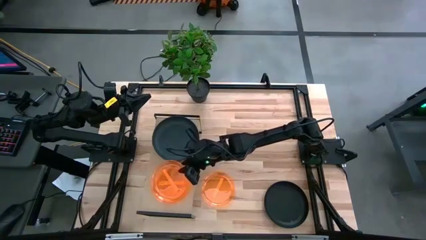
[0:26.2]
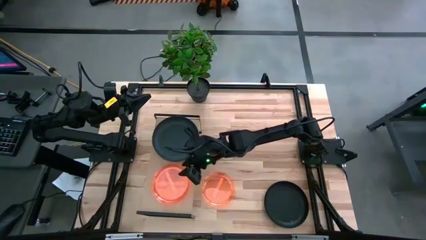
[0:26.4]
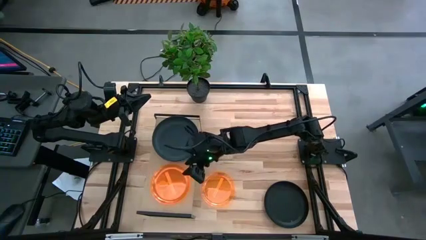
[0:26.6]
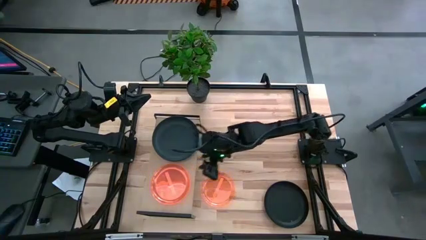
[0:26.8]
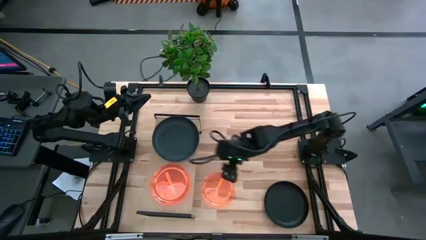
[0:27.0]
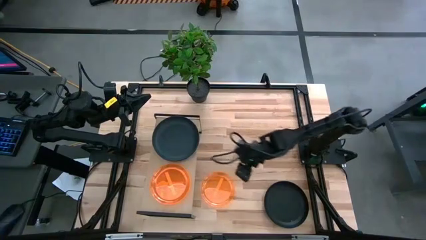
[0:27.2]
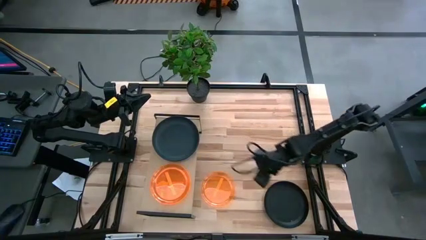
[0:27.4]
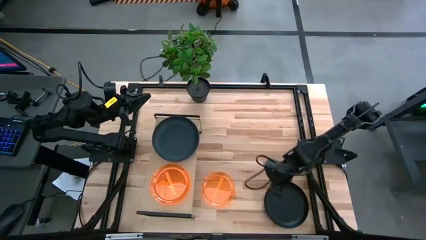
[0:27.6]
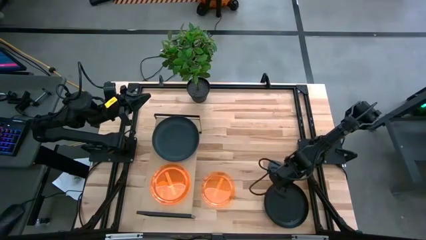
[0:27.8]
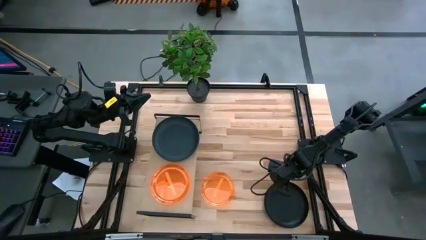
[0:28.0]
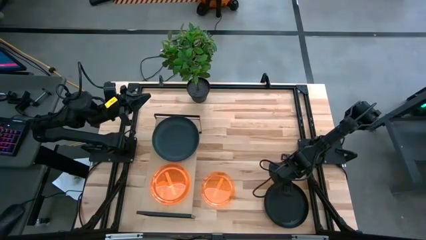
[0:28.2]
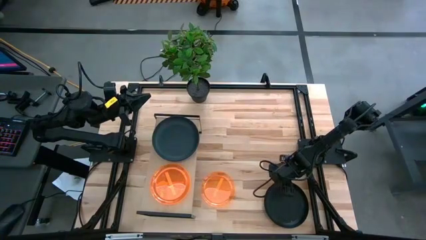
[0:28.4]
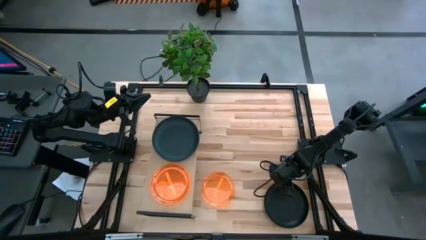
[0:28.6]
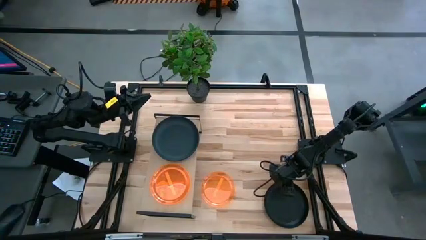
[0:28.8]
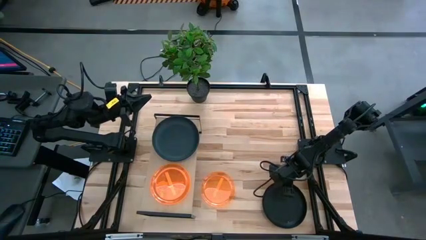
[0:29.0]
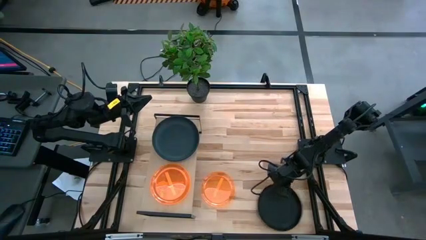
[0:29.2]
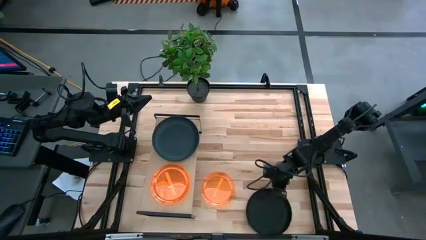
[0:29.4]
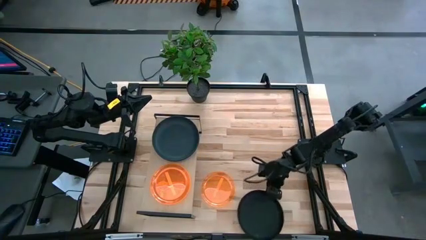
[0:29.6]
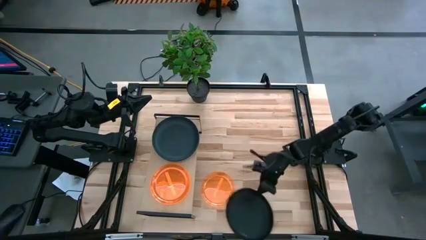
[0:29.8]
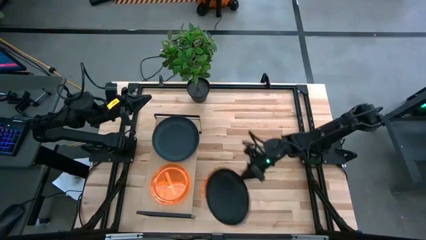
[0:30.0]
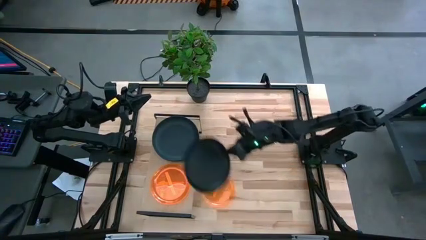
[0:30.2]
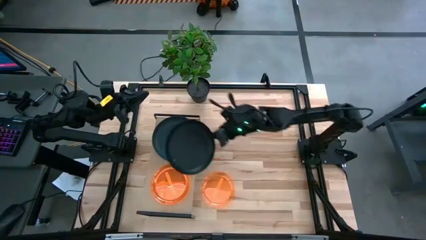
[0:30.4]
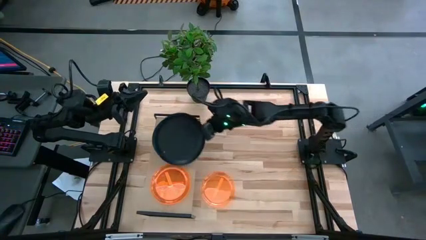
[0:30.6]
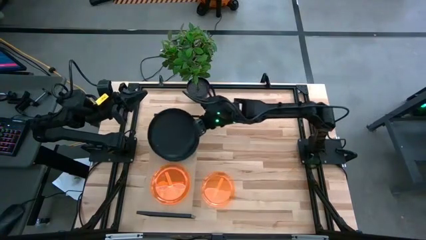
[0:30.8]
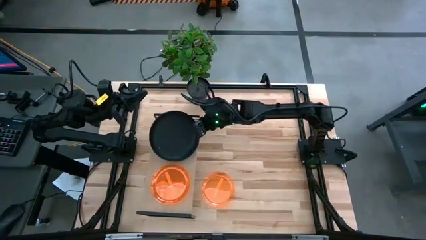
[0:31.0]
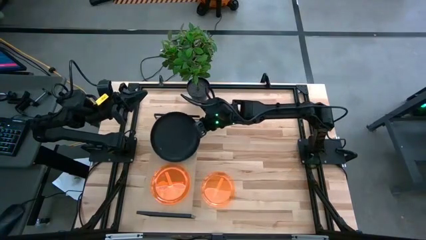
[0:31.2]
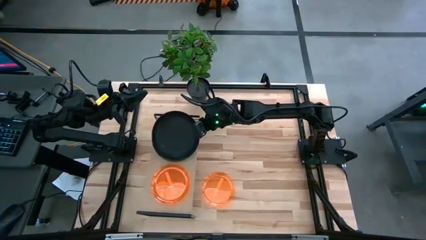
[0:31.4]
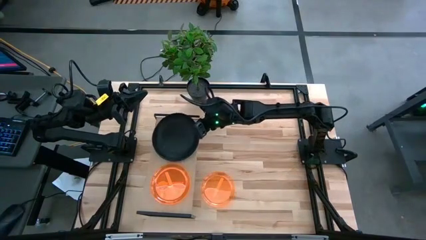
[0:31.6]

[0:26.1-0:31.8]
Task: Place and stack plates onto a shelf
Stack the black plate on top of the black plate on the shelf

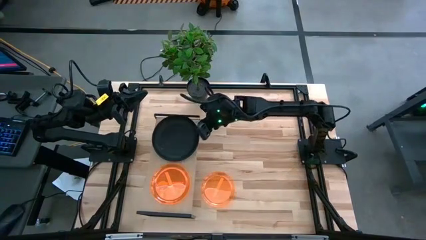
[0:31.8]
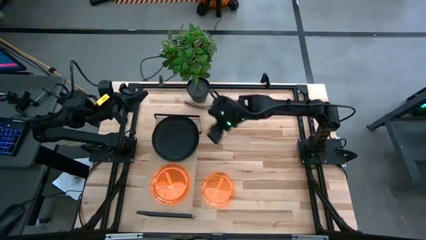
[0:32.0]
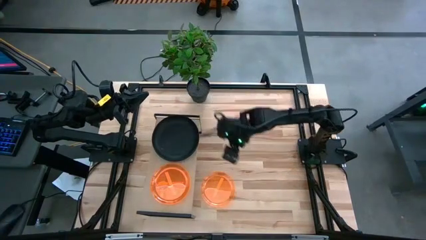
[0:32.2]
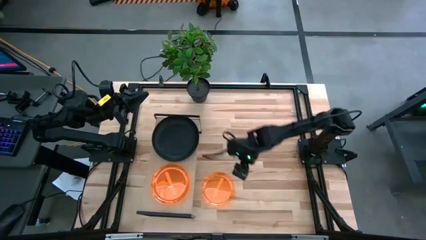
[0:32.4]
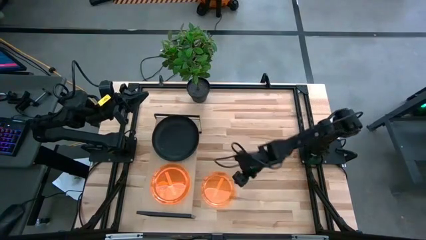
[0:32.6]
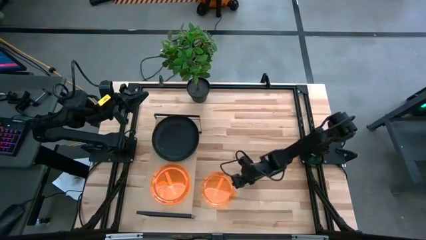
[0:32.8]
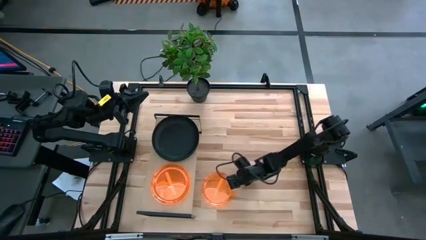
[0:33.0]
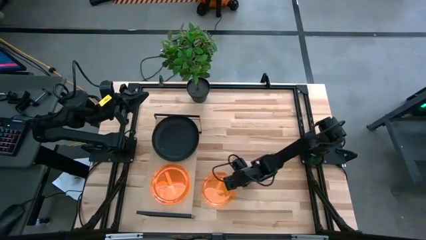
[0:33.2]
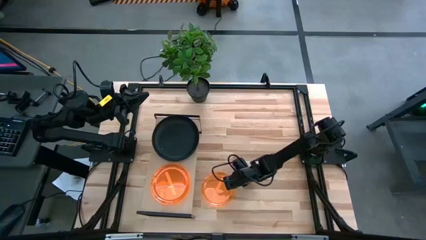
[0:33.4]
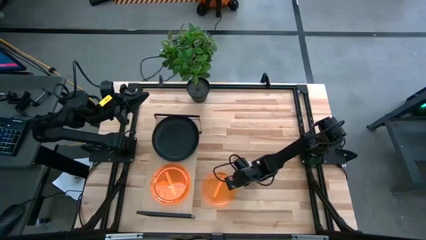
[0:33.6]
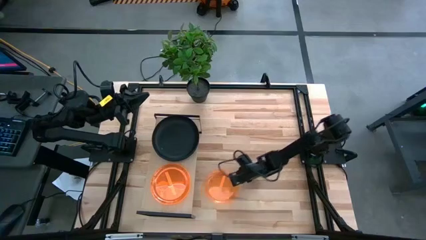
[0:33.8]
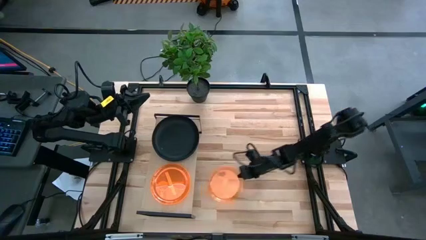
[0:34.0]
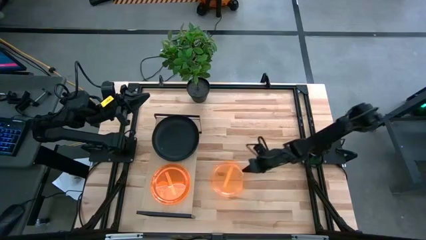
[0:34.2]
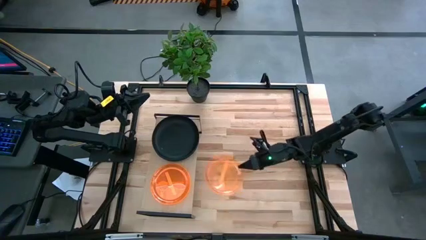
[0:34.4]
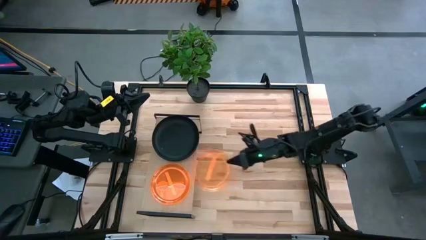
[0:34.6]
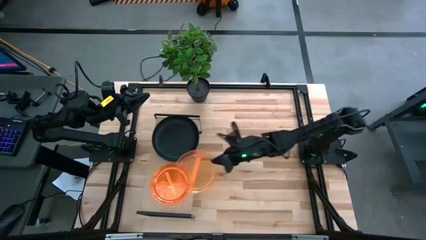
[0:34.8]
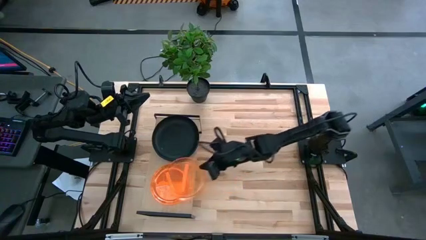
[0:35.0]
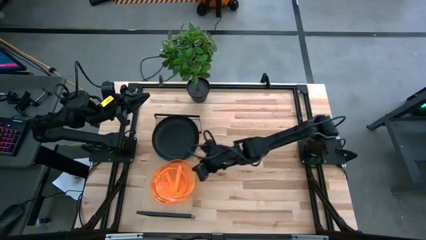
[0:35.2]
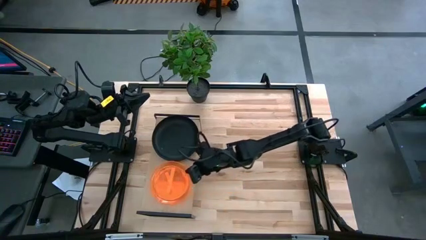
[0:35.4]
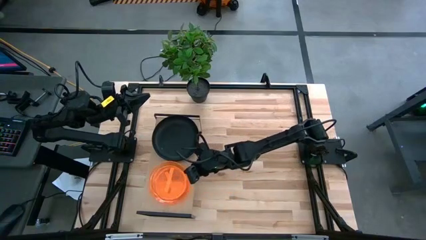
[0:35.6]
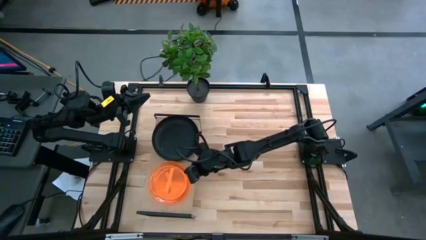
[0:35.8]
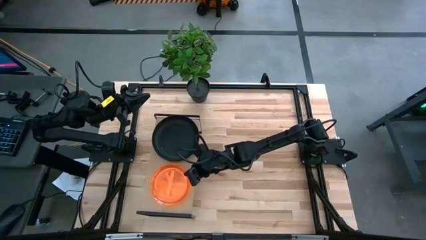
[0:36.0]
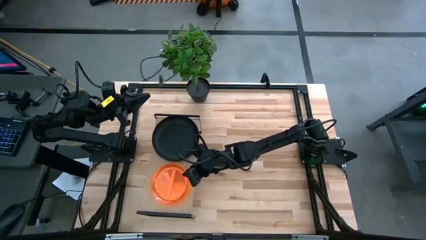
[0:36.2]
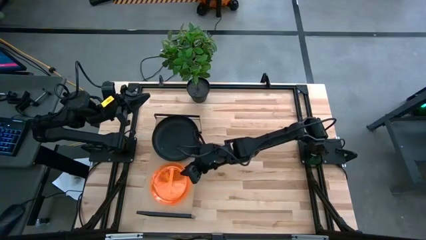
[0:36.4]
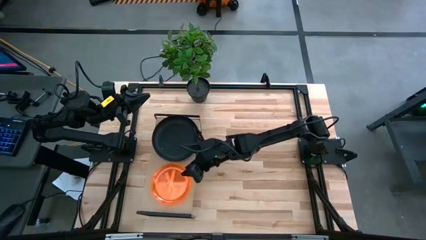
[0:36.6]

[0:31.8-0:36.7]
Stack the orange plate on top of the orange plate on the shelf

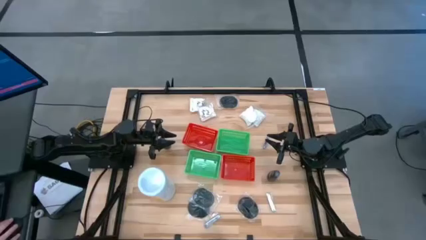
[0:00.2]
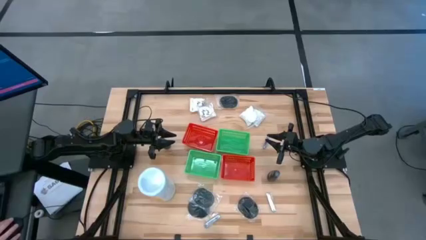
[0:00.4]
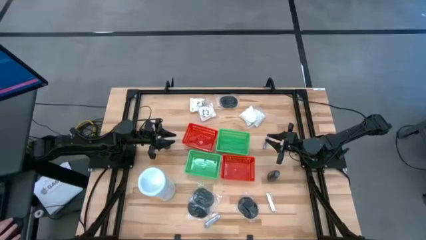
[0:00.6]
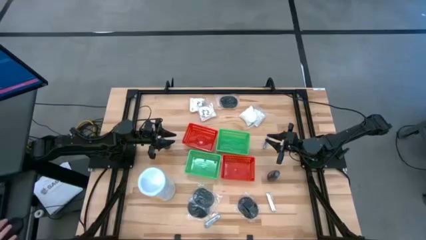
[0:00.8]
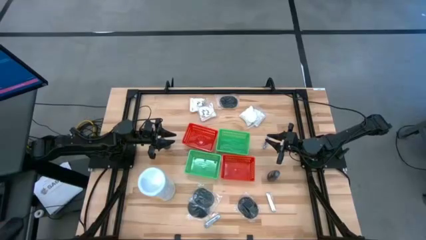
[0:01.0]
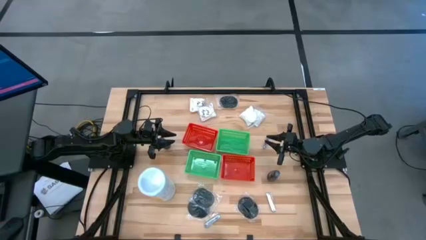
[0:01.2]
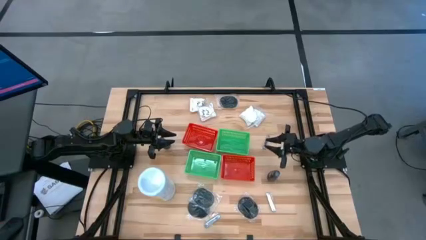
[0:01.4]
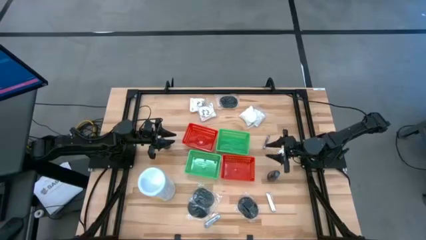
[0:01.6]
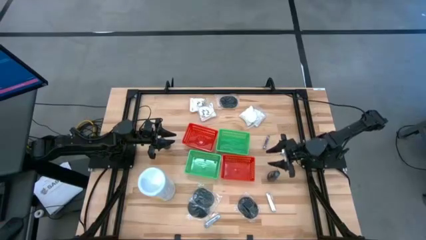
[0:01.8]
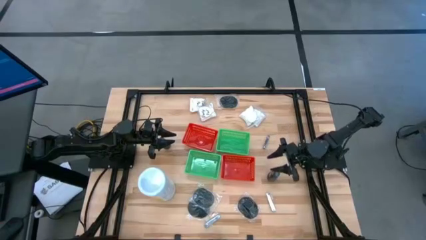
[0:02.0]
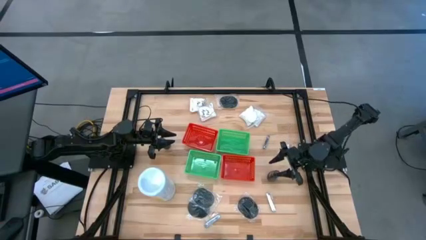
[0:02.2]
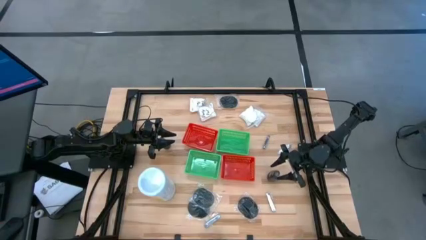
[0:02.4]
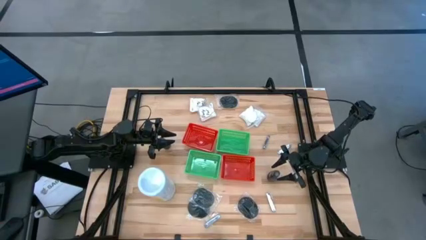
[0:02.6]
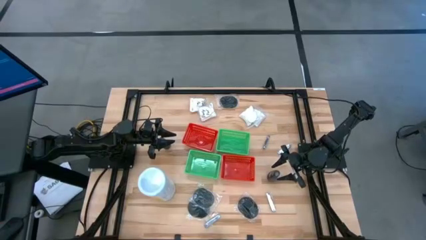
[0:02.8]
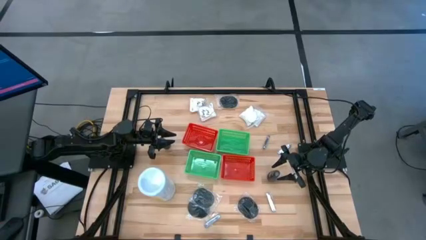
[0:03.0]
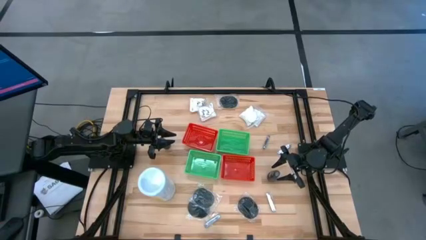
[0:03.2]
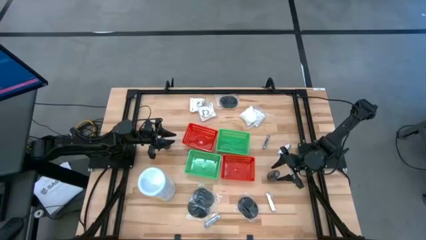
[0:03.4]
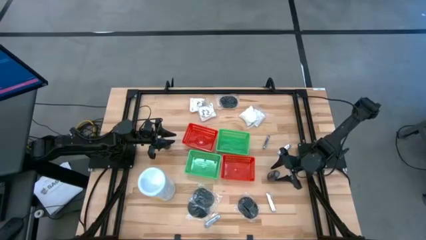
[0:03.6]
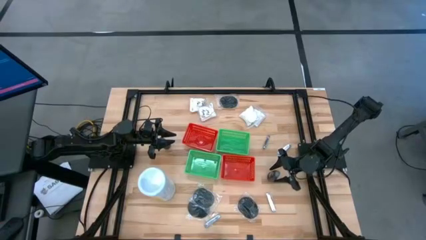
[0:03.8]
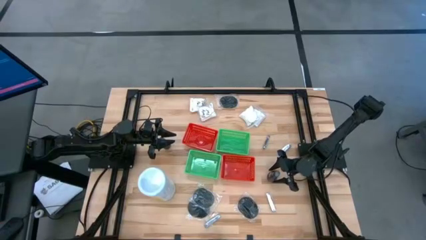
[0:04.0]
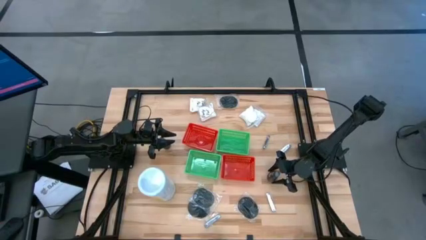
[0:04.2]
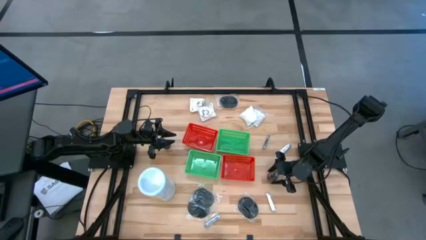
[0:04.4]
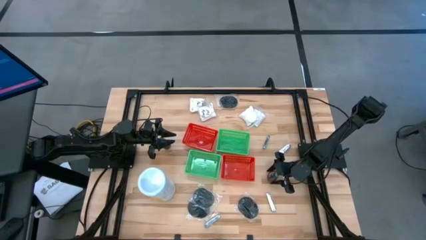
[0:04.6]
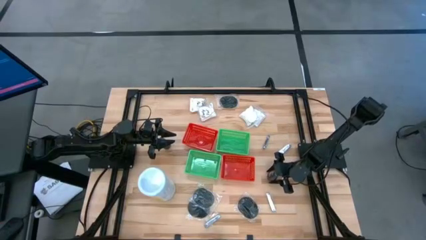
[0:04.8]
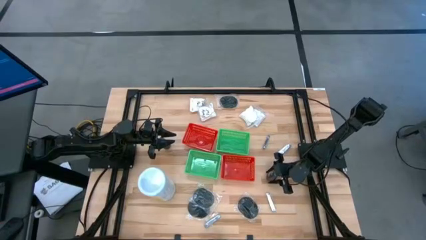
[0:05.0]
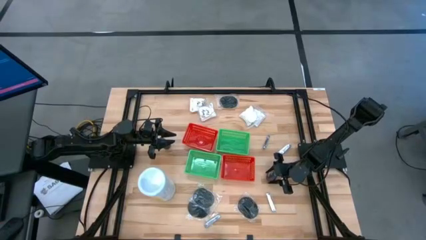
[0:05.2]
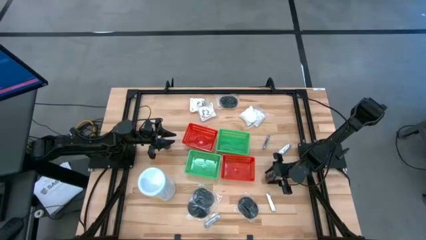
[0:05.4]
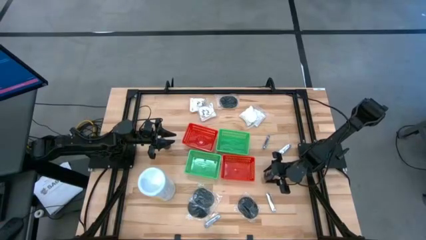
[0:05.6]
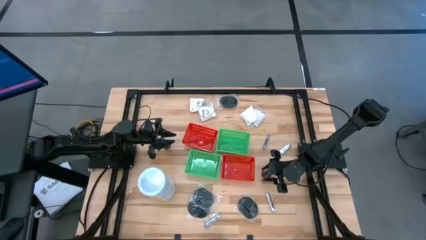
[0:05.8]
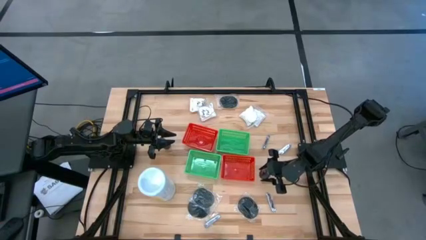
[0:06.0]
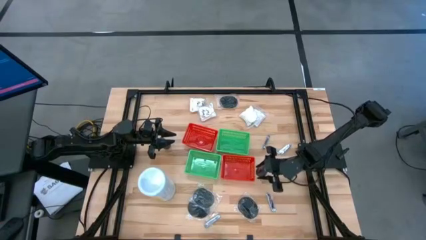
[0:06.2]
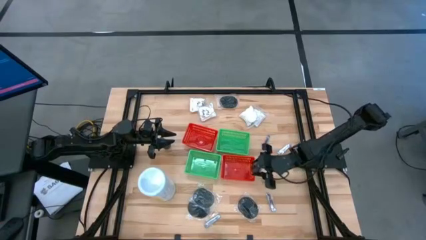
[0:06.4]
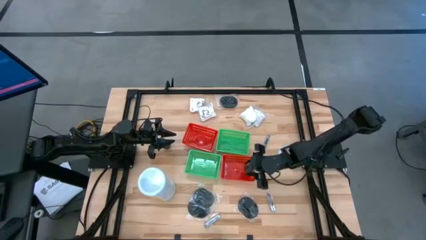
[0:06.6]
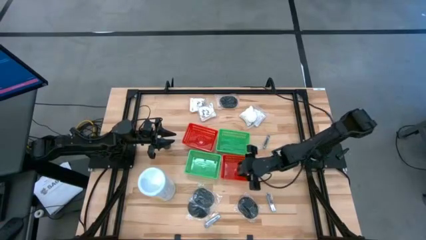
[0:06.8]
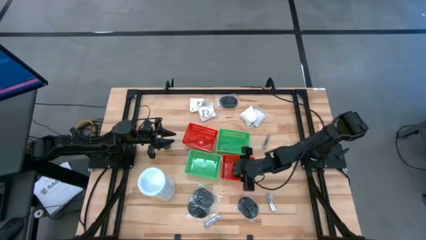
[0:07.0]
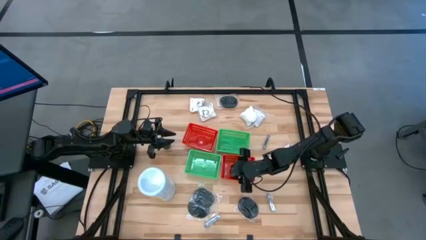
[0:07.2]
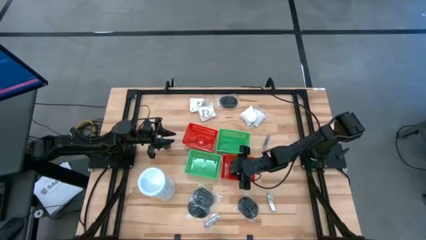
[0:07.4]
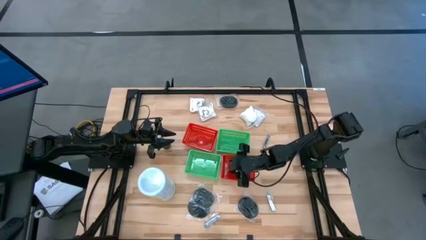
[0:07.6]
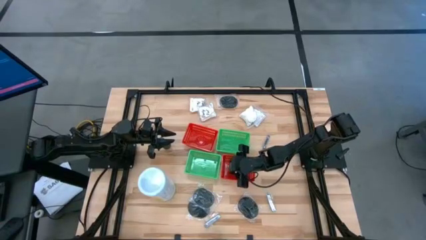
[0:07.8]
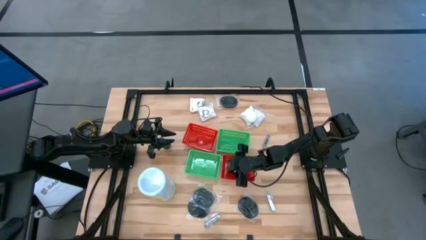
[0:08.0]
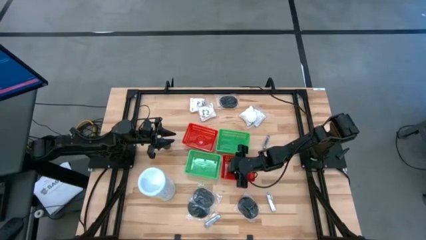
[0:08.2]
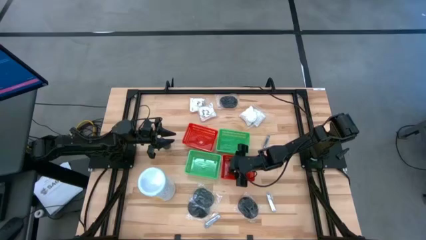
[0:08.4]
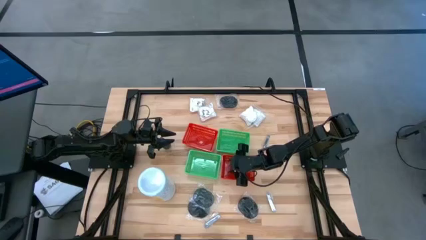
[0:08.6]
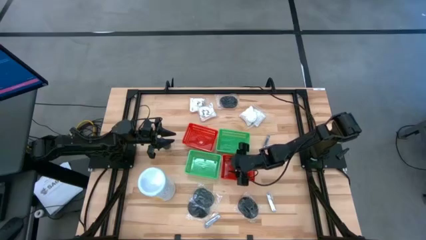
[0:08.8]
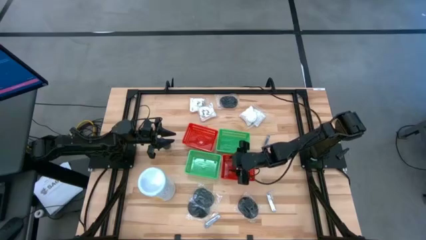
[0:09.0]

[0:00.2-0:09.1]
Task: Pick & Place Travel size toiletries
Put the black deodorant into the bottom right red bin
